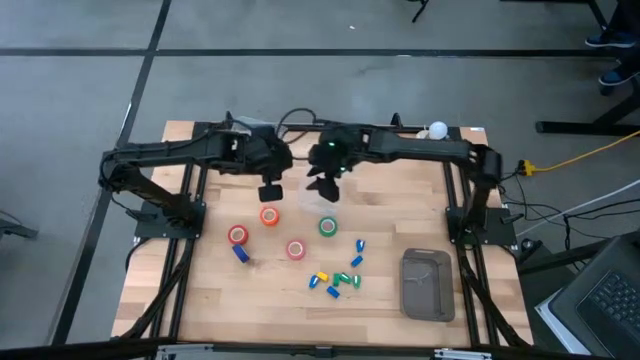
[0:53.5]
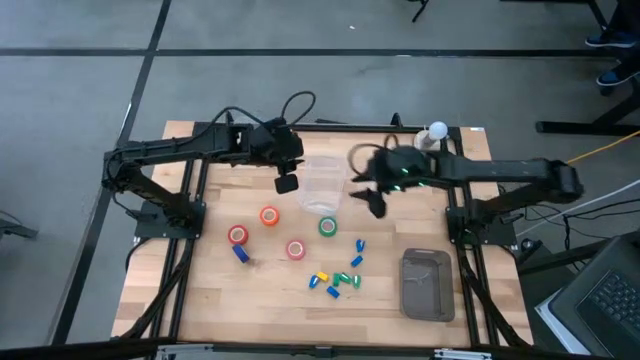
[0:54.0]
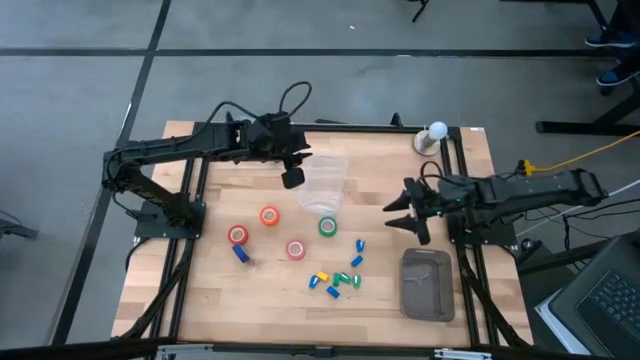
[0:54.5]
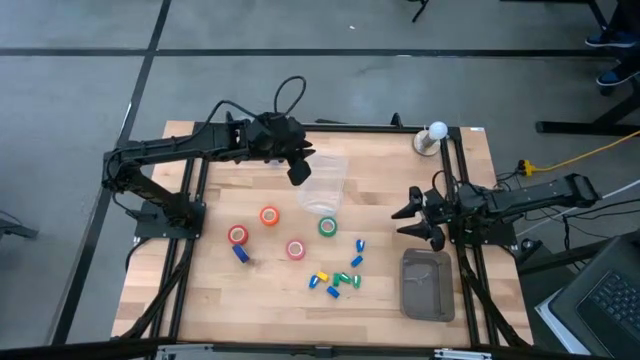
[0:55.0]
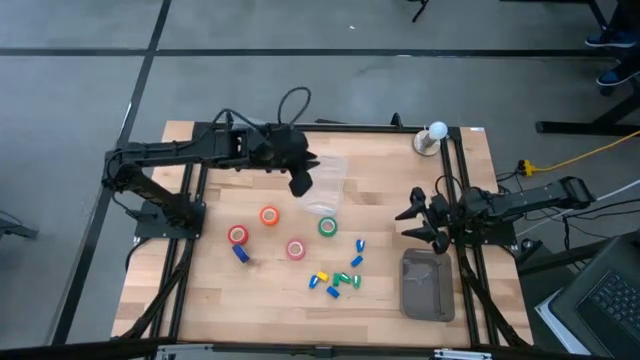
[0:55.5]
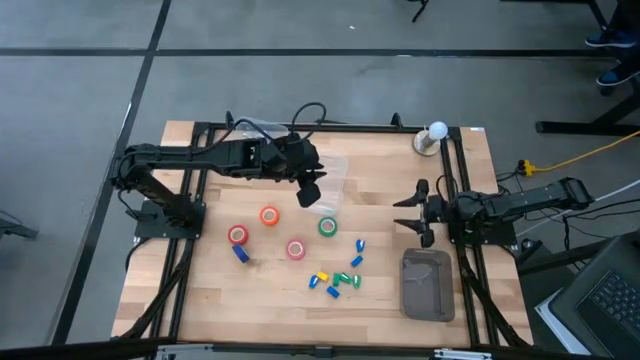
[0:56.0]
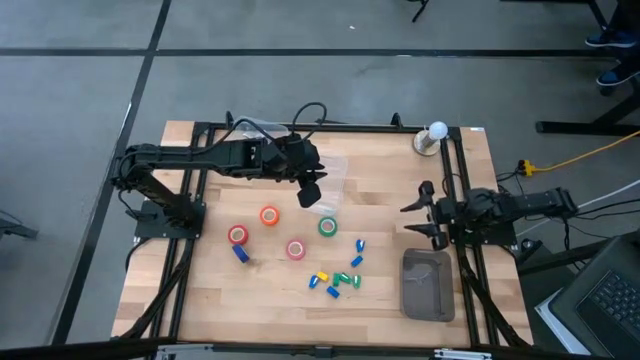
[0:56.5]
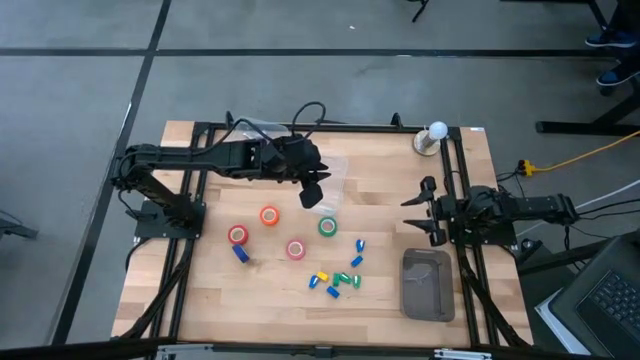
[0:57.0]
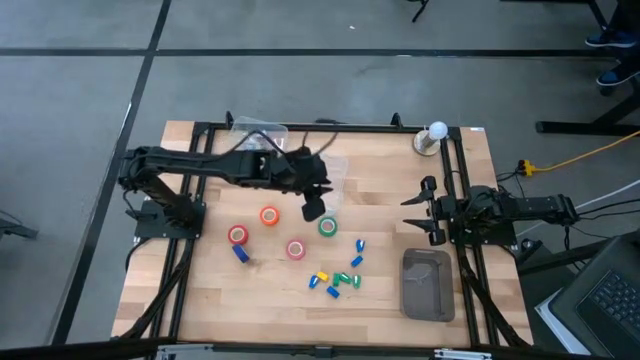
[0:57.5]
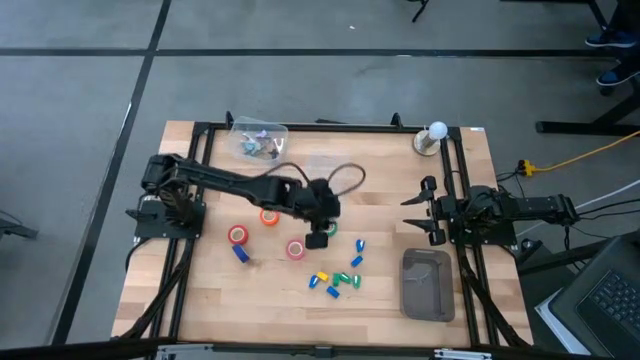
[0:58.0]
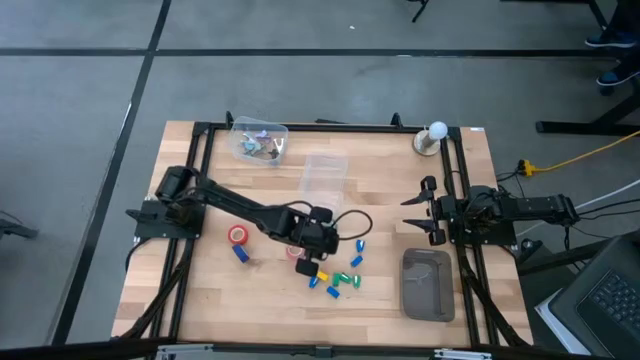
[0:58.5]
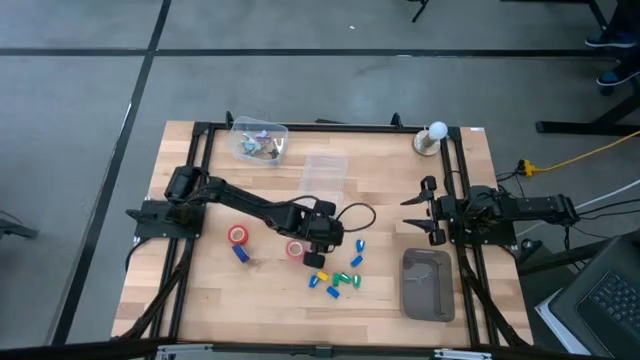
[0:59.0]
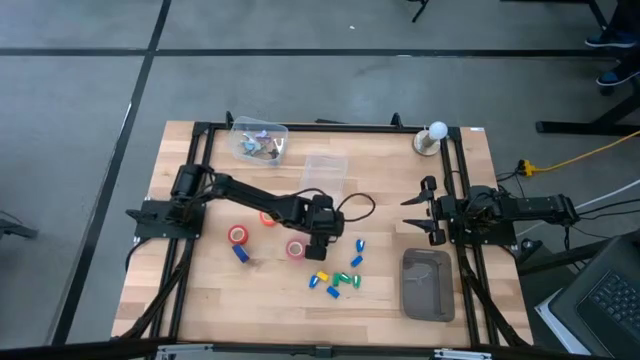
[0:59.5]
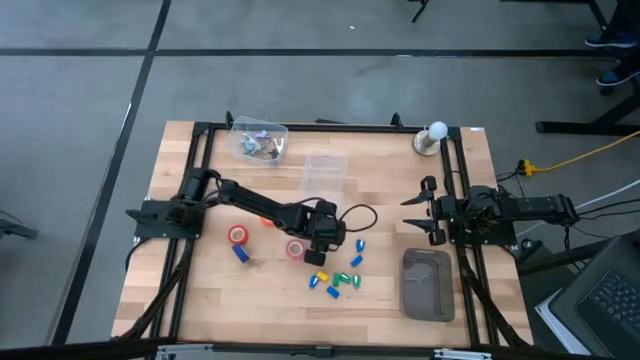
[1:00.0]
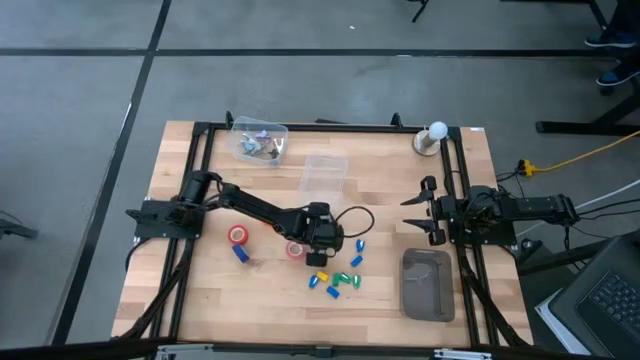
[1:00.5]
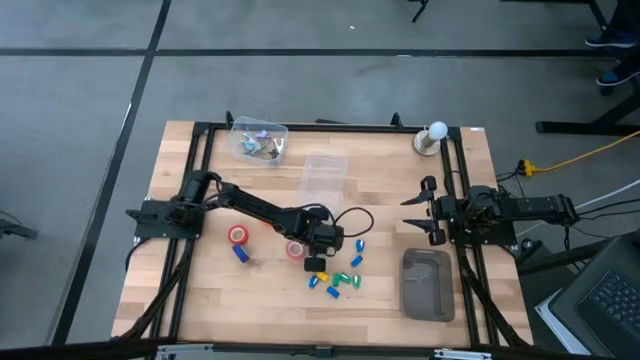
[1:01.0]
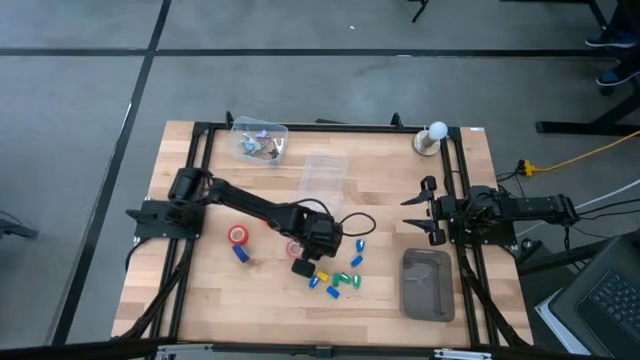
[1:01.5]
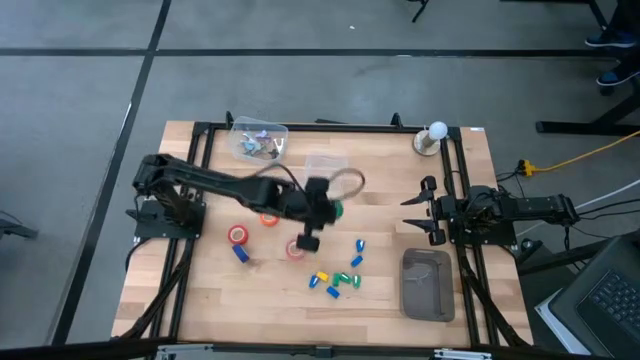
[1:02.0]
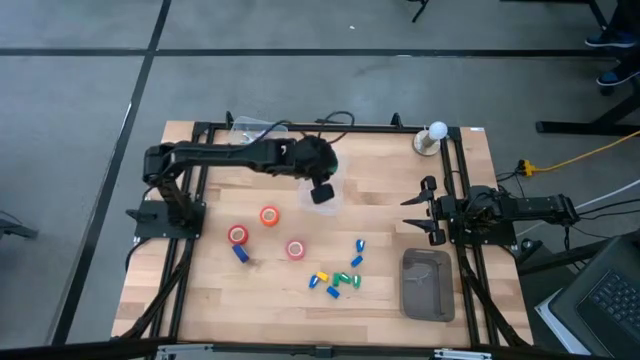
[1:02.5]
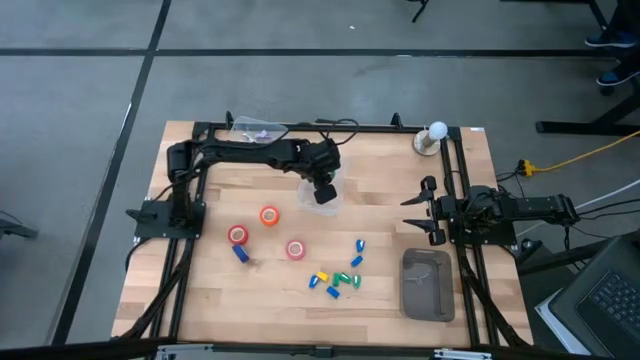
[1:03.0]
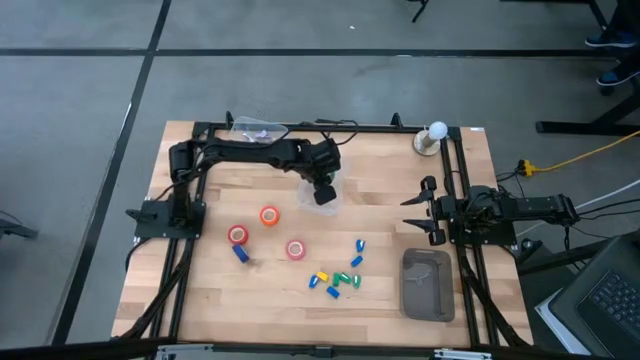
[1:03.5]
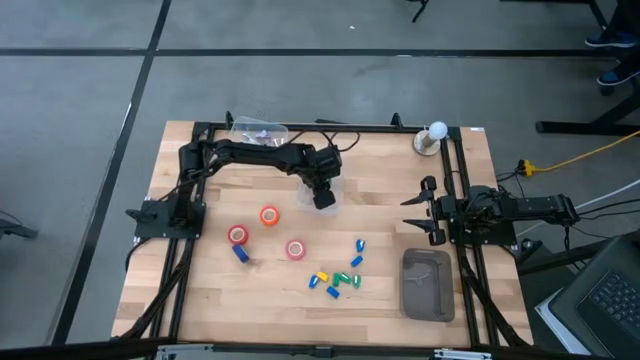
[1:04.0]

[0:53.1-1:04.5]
Task: Pick and place Stapler, Stapler remover, tape
Put the green tape into the bottom transparent bin

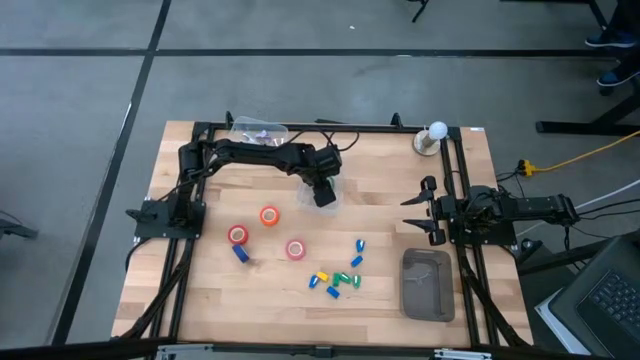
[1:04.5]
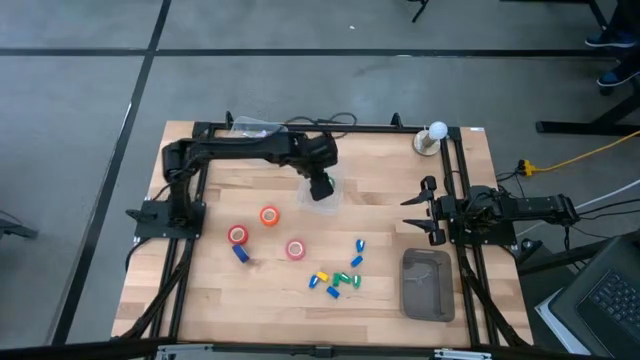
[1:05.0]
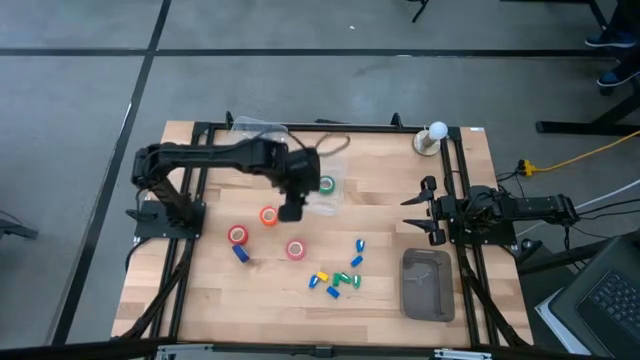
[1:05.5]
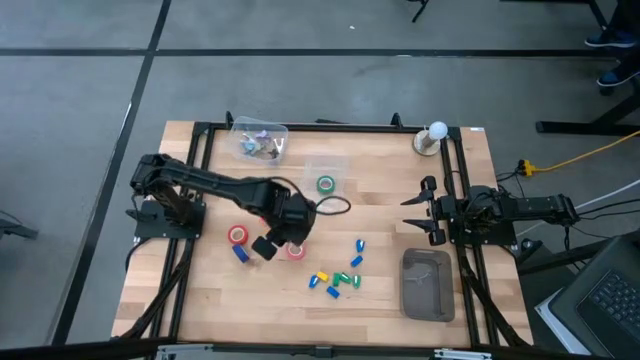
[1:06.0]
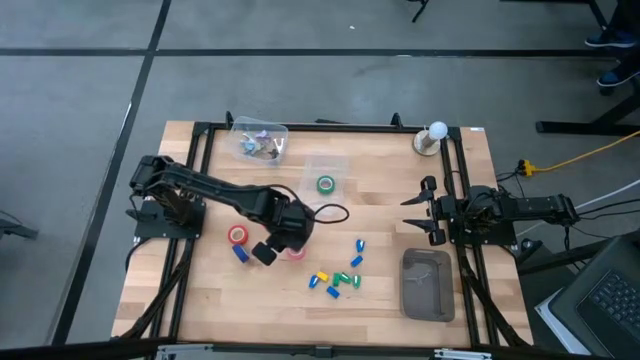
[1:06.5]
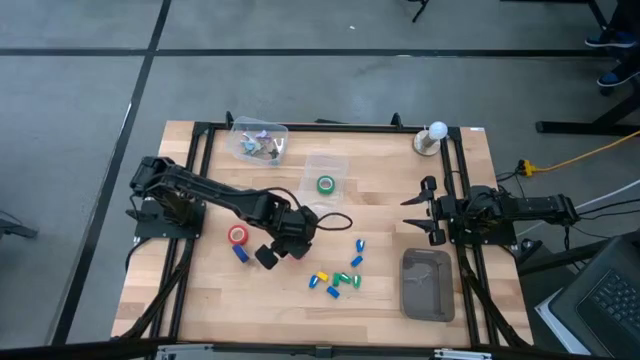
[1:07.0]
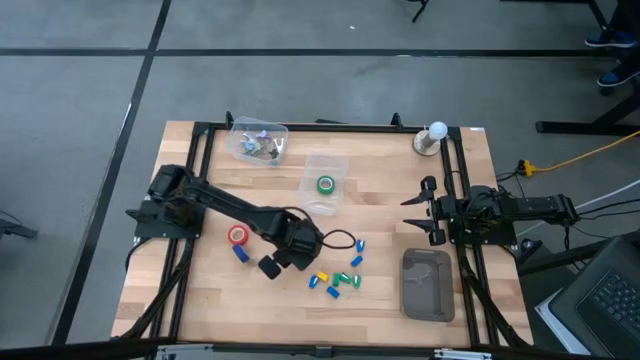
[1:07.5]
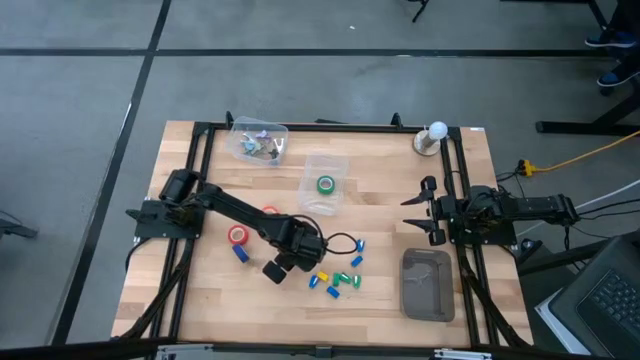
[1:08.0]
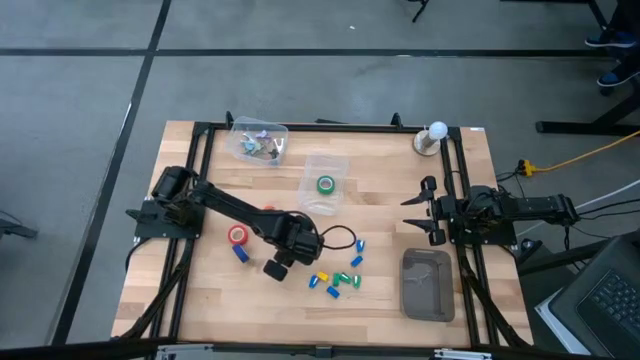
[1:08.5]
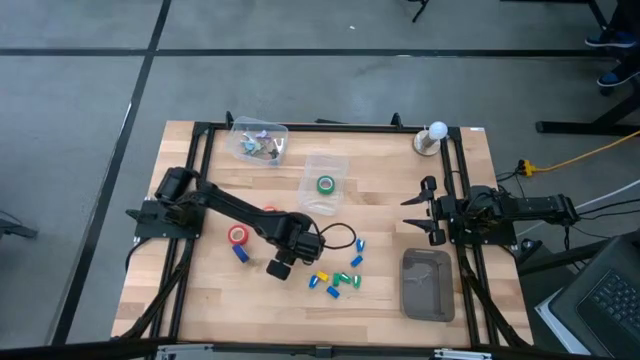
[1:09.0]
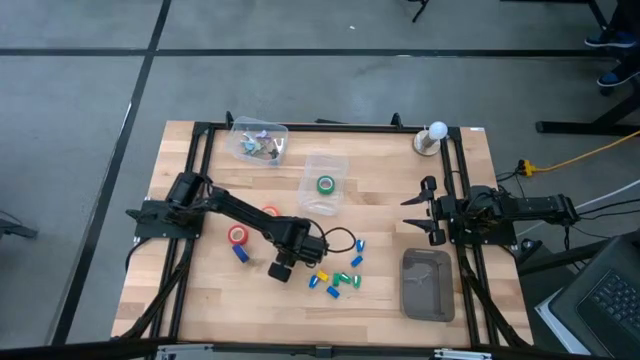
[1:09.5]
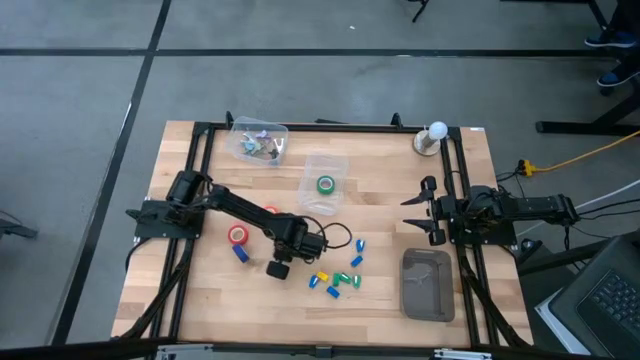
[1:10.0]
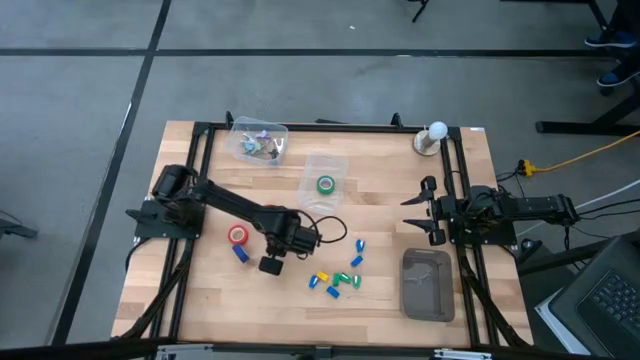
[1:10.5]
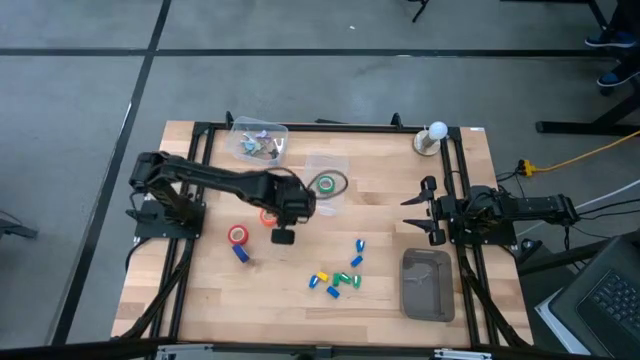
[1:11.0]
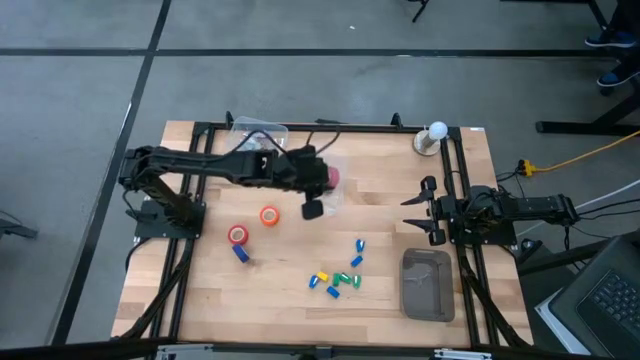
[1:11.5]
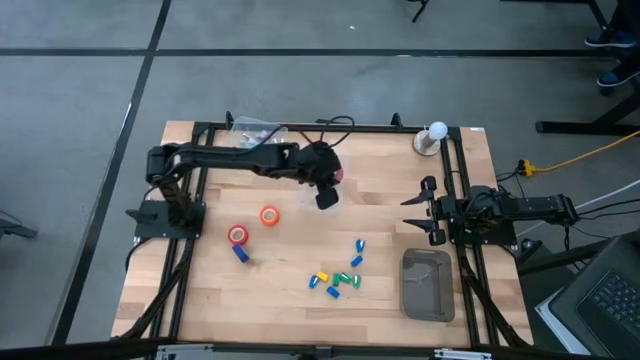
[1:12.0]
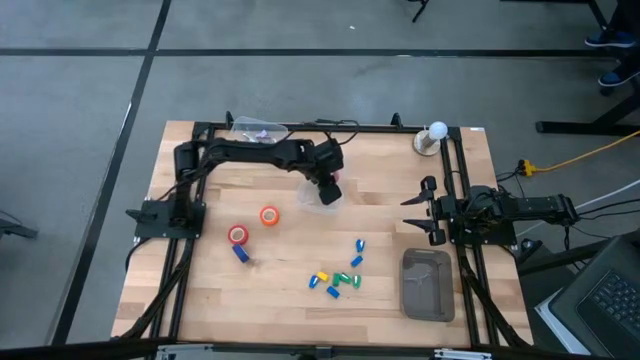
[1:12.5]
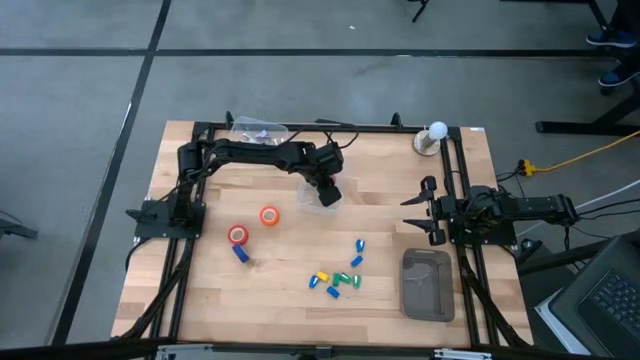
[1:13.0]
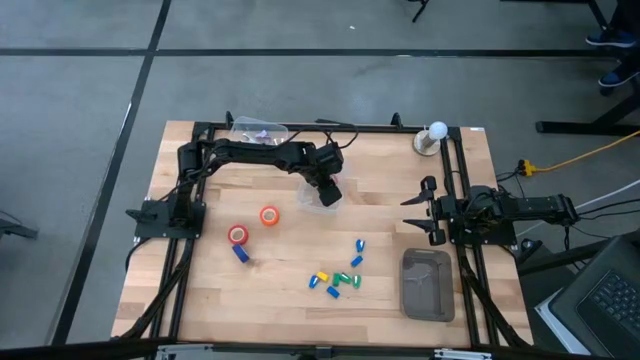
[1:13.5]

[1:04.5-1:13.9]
Put the pink tape into the bottom transparent bin

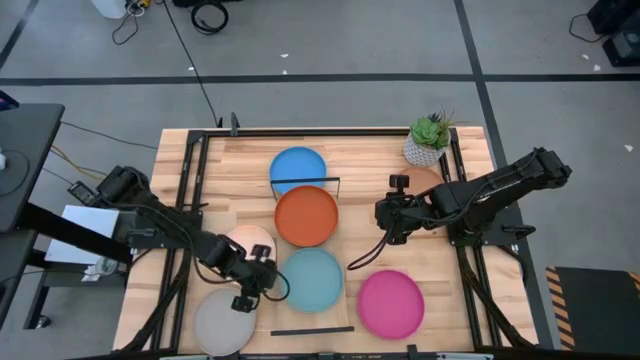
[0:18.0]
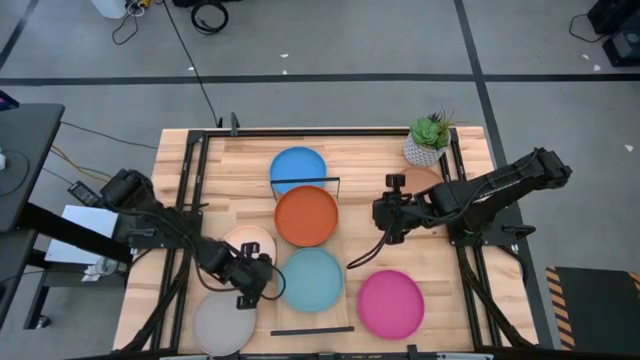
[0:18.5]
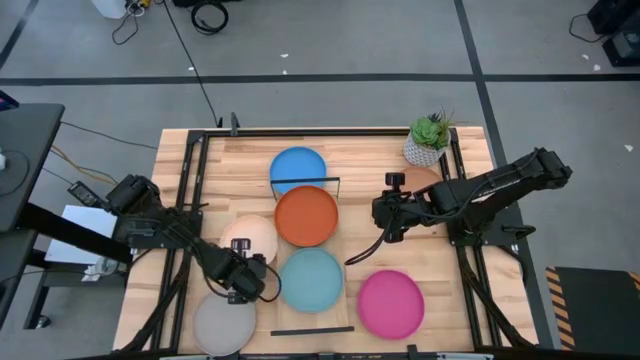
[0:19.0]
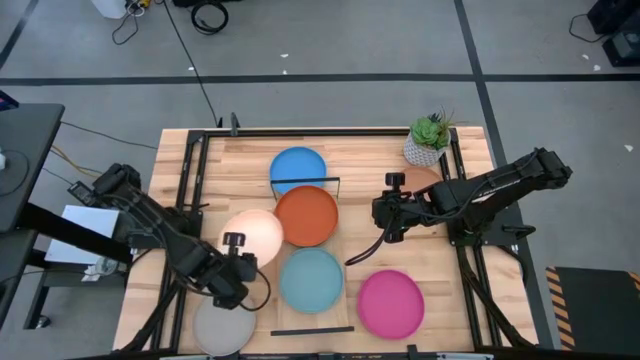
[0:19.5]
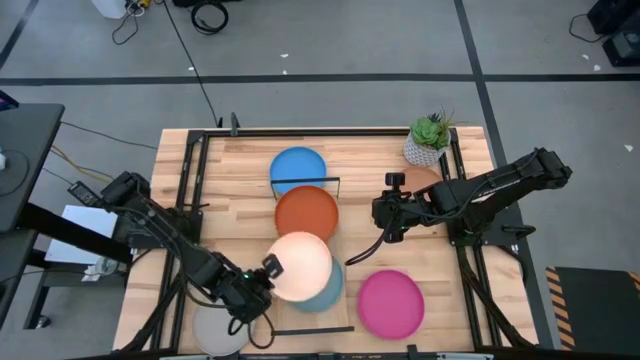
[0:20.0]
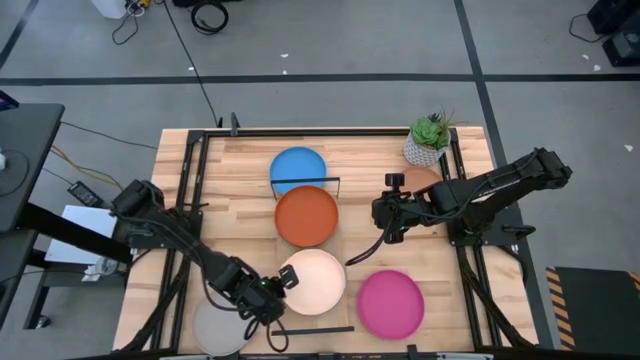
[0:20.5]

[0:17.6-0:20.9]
Task: Place and stack plates onto a shelf
Stack the light orange plate on top of the light blue plate on the shelf
